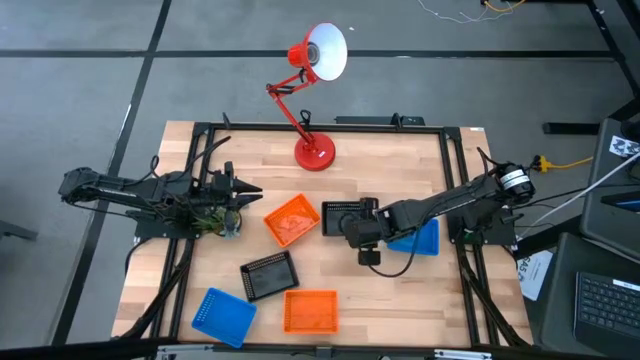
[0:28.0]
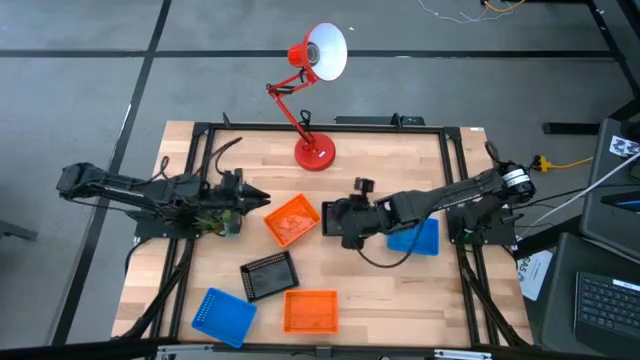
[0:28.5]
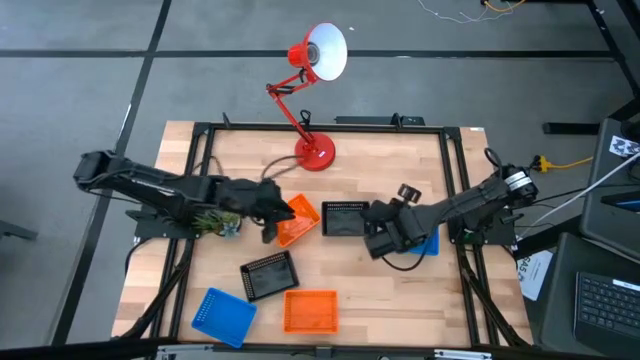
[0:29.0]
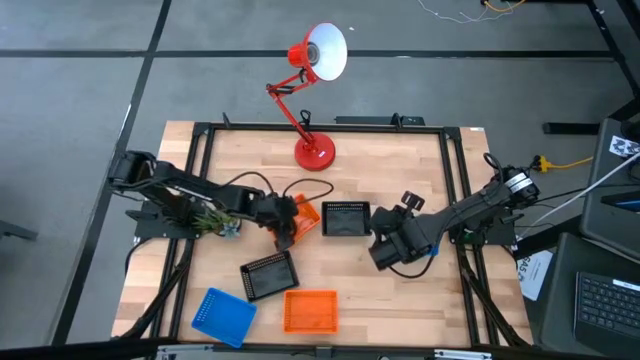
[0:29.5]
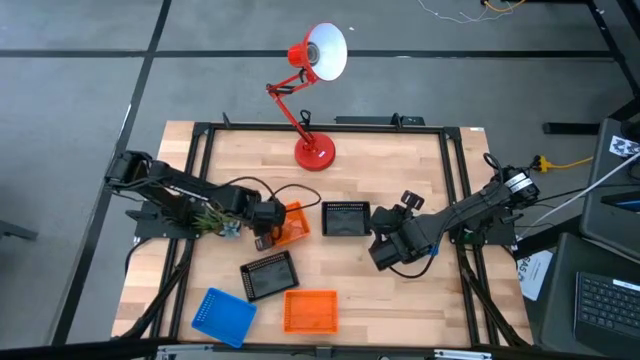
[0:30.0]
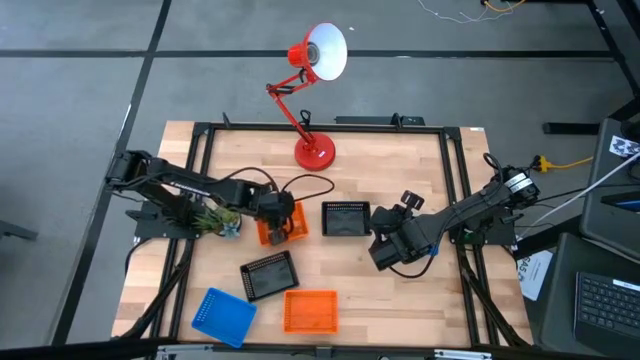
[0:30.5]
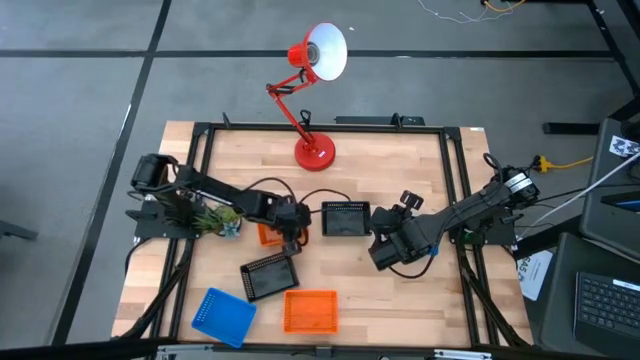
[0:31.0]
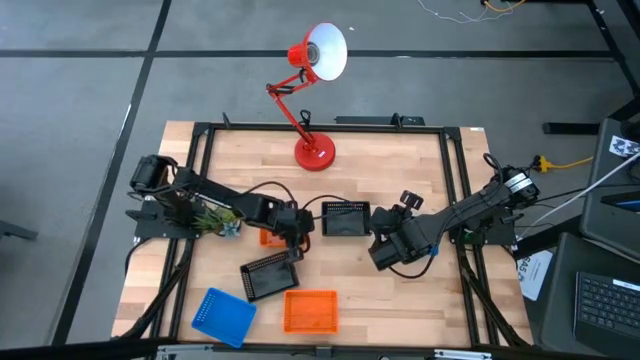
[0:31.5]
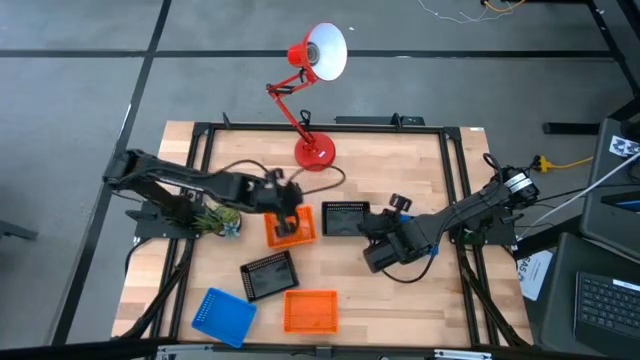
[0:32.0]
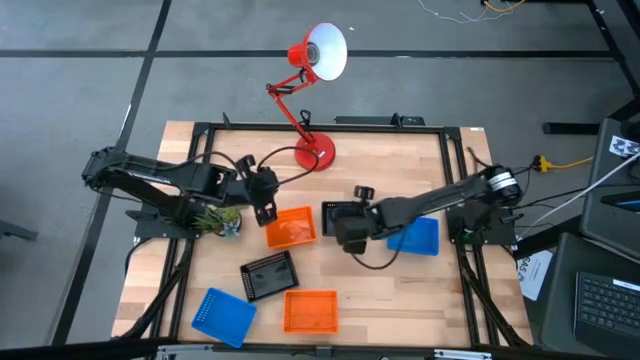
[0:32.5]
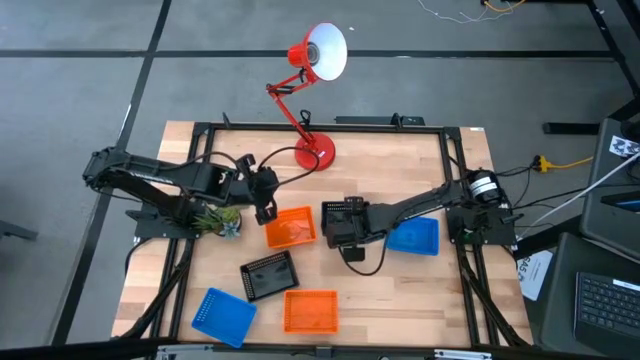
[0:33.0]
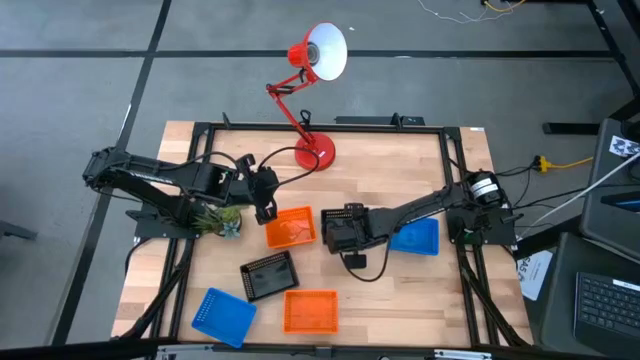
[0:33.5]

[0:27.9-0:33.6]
Adjust the stacked orange and black bins

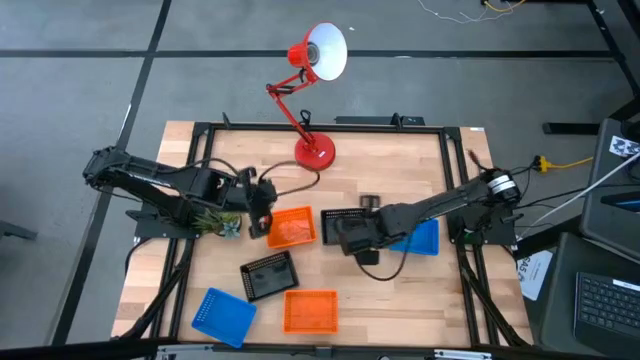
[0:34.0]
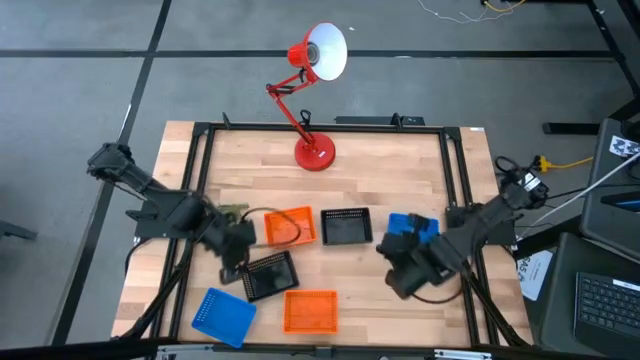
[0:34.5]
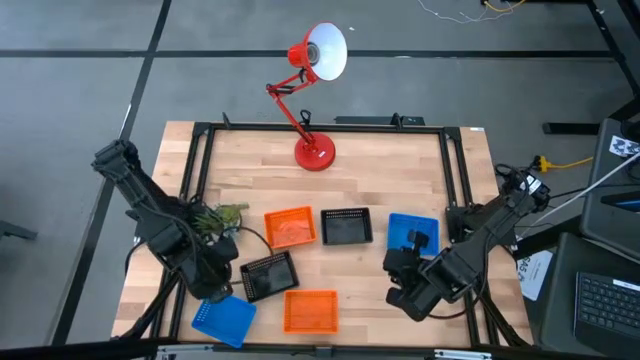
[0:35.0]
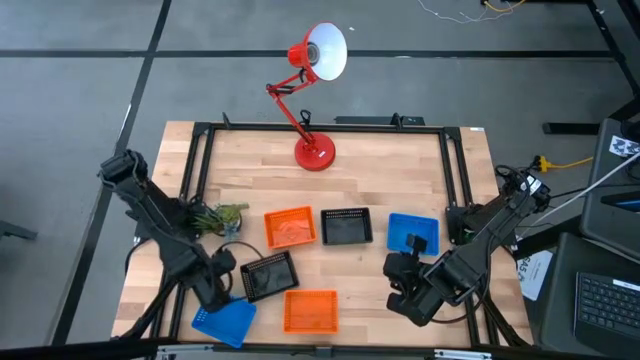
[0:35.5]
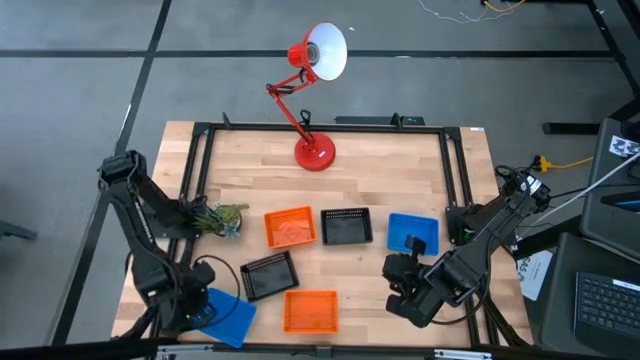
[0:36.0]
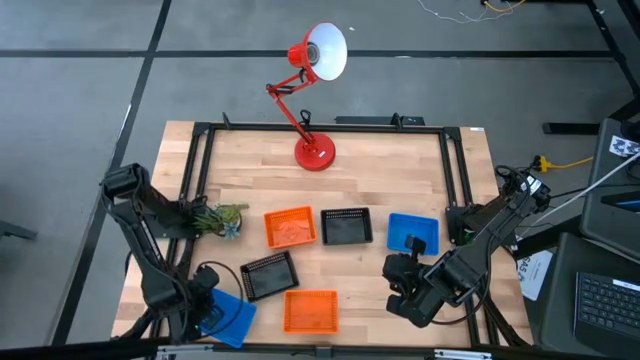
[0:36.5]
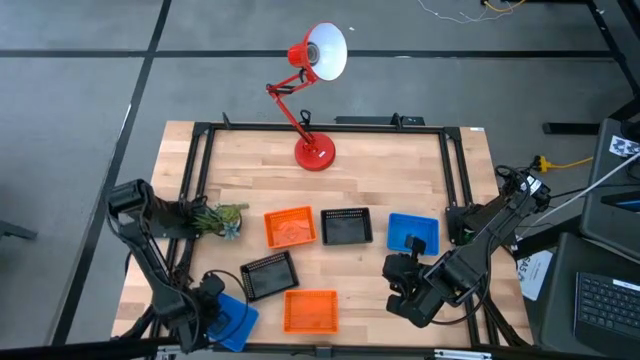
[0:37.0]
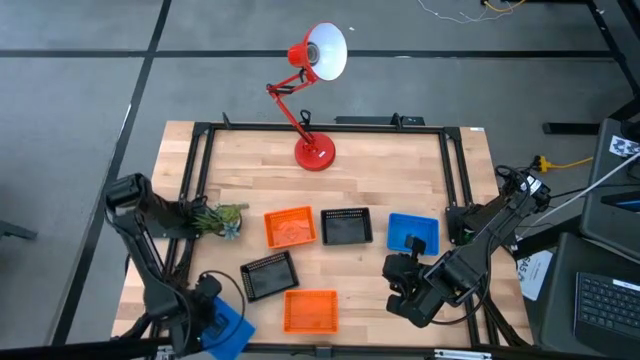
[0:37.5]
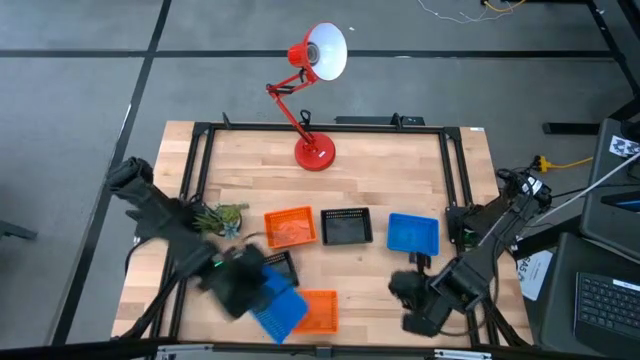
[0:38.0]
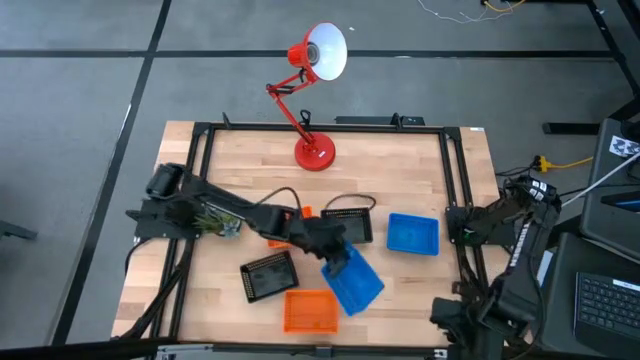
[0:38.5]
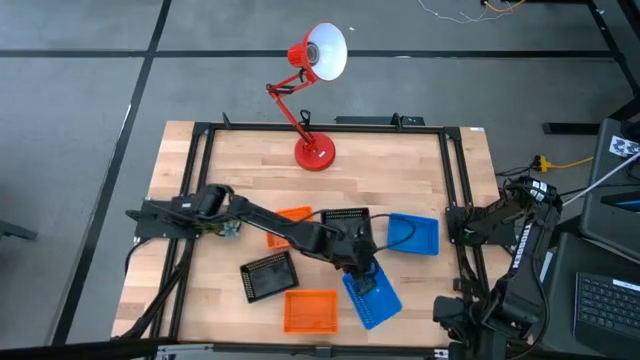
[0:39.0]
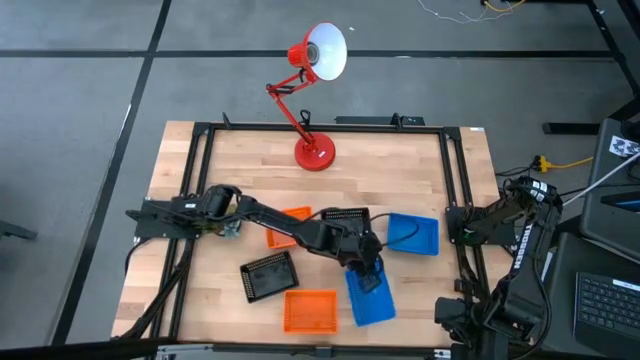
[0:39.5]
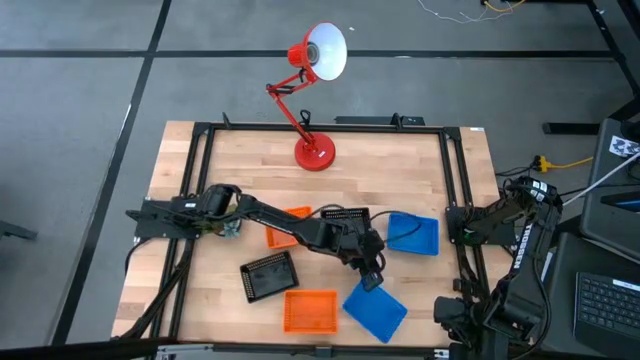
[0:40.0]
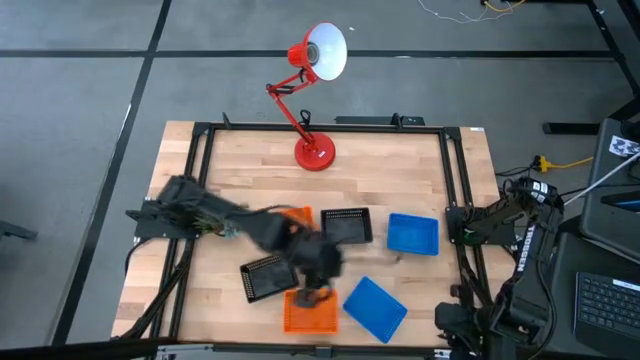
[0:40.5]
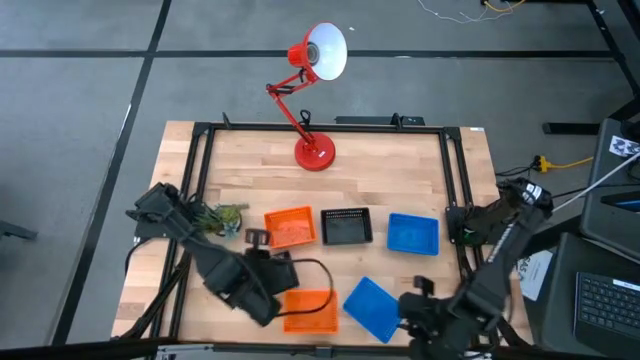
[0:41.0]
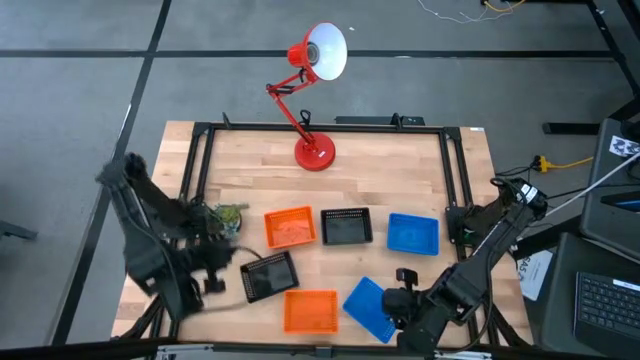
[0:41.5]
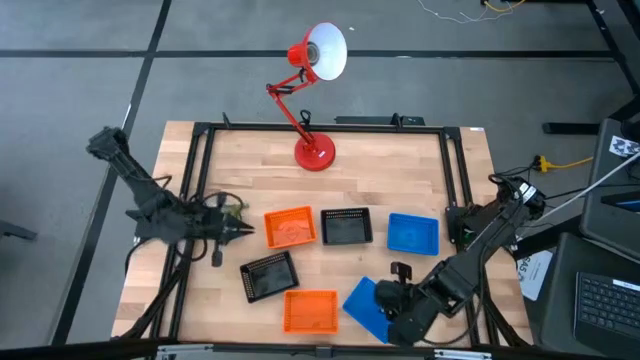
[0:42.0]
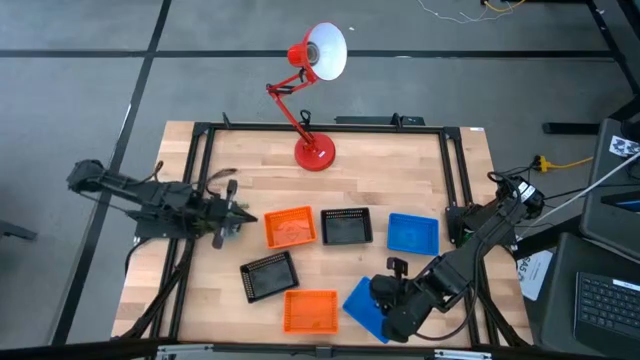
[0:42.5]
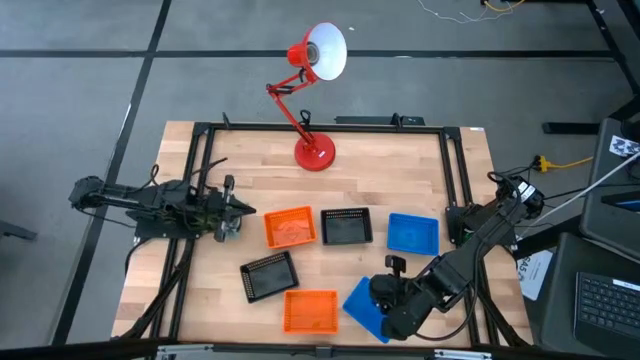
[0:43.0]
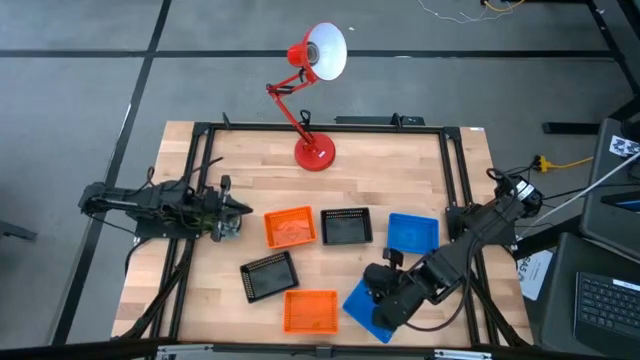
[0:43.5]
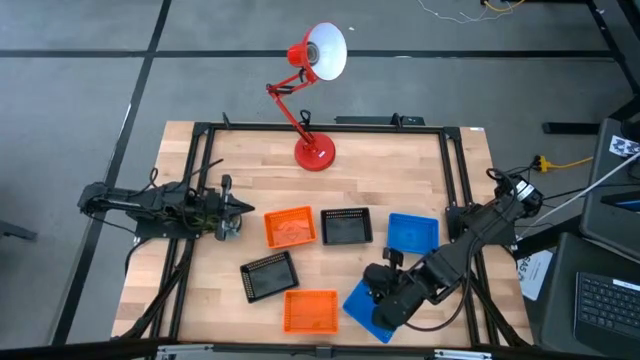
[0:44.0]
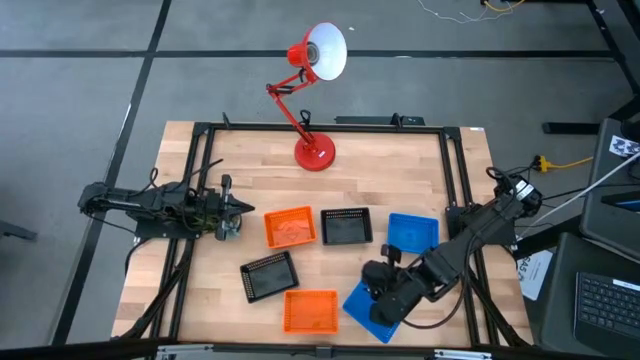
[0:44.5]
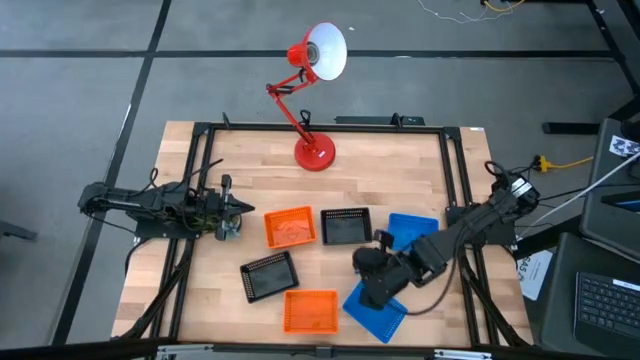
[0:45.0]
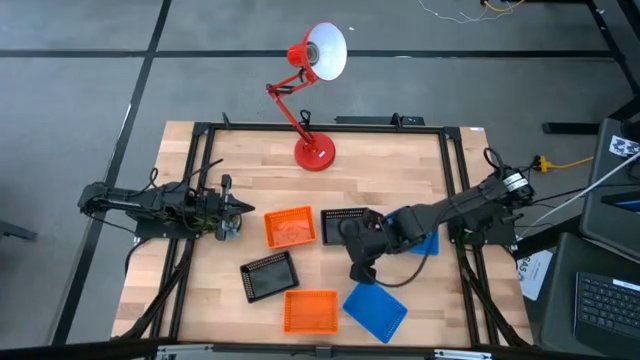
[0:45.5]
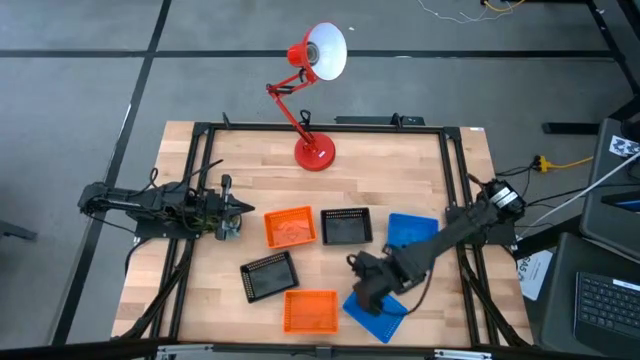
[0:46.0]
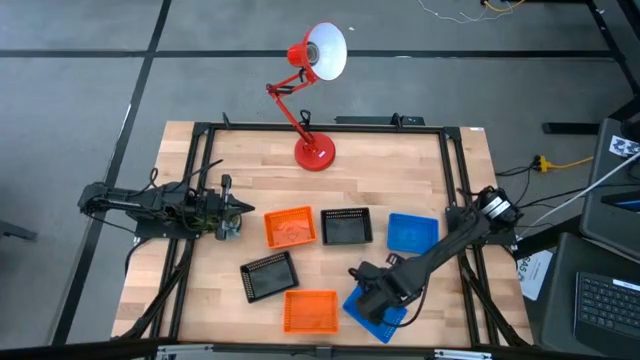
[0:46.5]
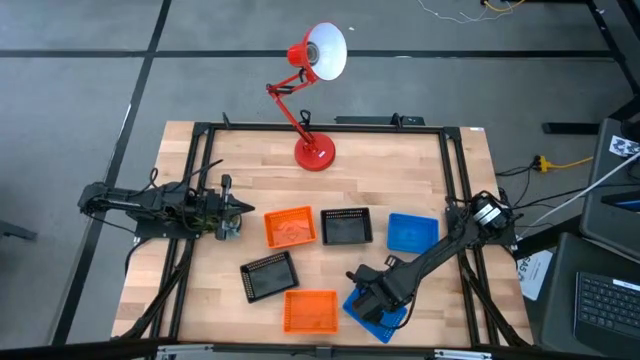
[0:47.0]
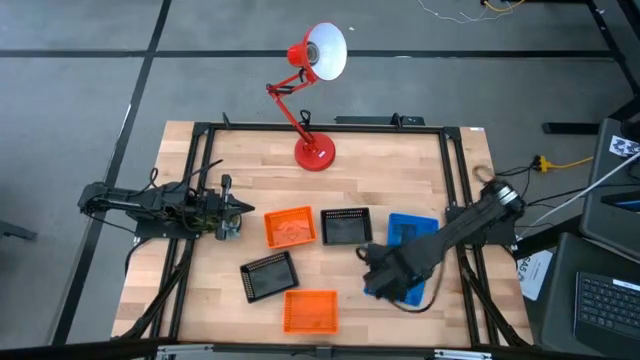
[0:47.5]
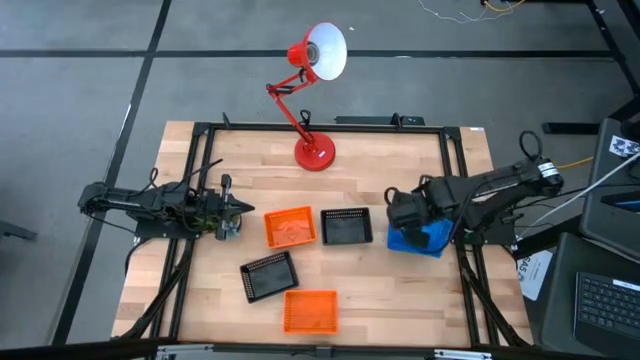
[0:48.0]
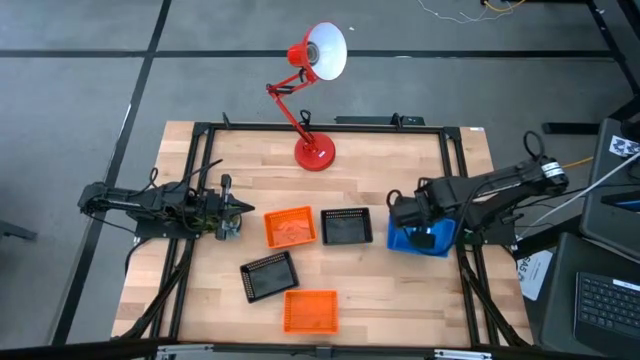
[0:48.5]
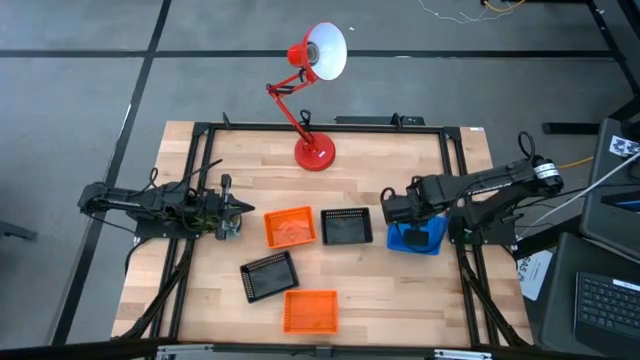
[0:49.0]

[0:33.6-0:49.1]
Stack the left blue bin on the right blue bins
